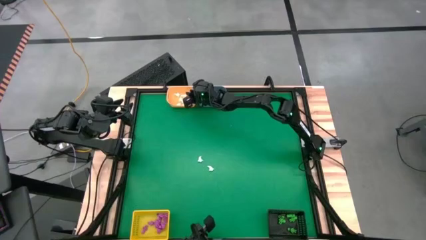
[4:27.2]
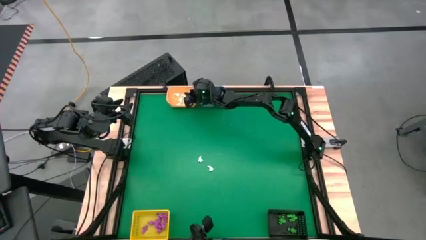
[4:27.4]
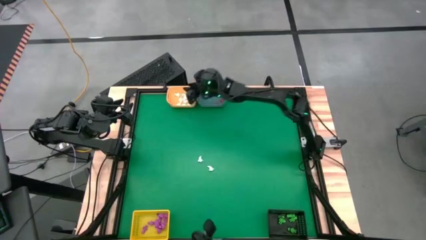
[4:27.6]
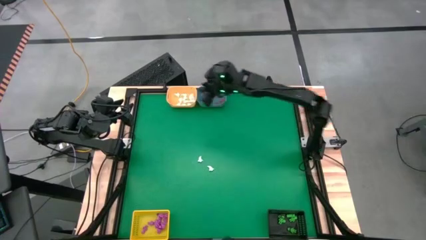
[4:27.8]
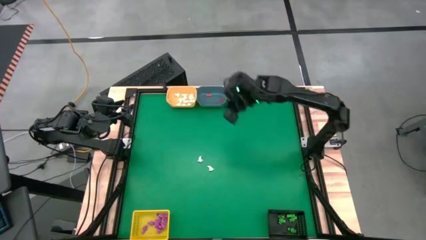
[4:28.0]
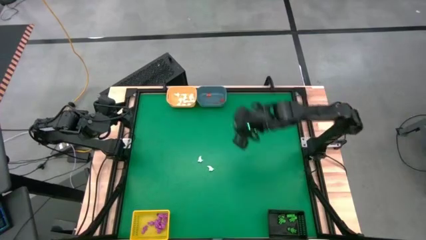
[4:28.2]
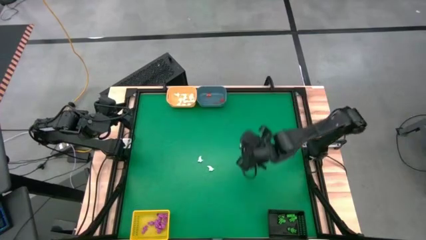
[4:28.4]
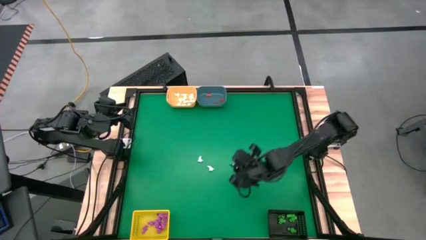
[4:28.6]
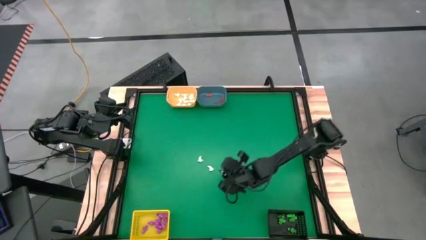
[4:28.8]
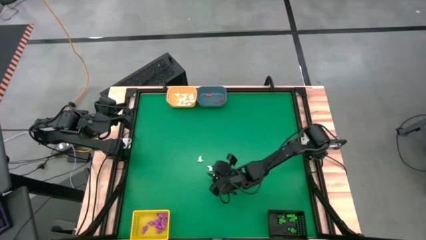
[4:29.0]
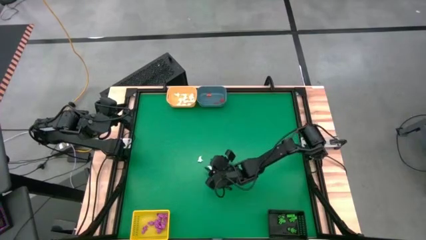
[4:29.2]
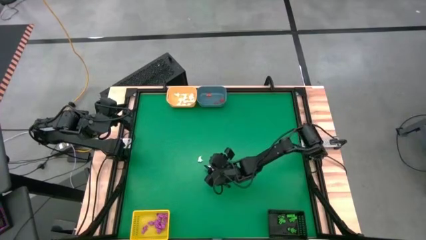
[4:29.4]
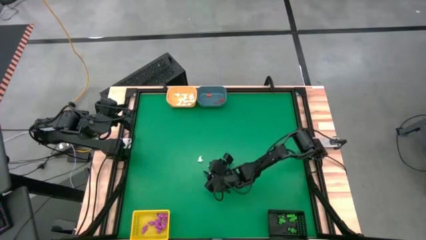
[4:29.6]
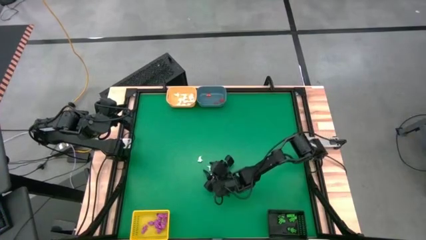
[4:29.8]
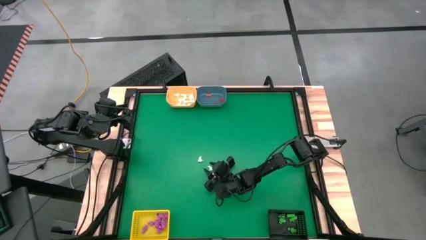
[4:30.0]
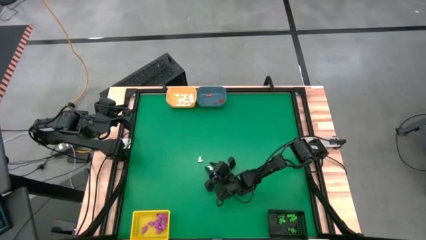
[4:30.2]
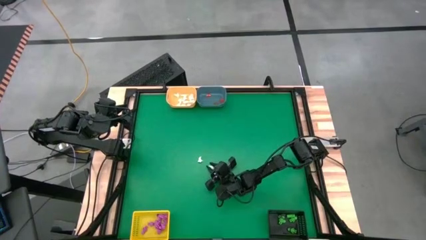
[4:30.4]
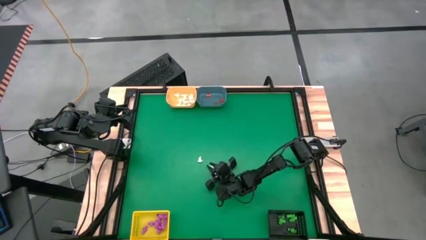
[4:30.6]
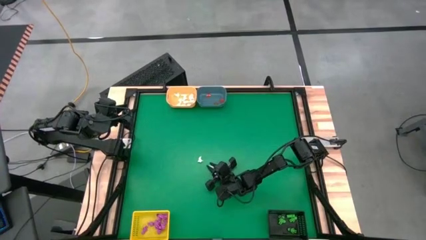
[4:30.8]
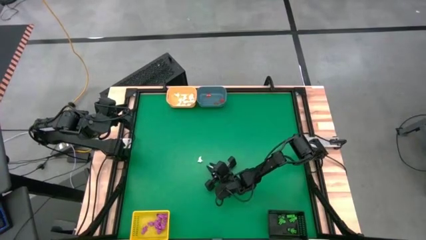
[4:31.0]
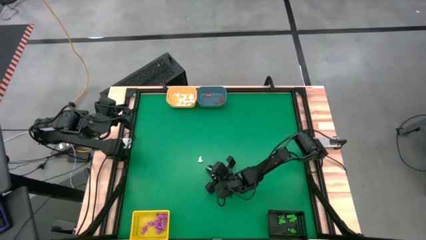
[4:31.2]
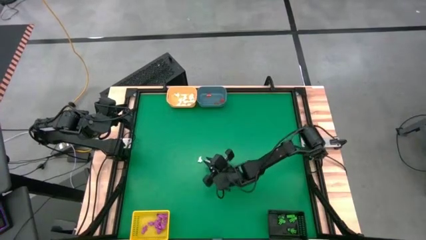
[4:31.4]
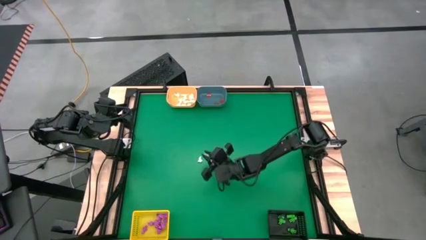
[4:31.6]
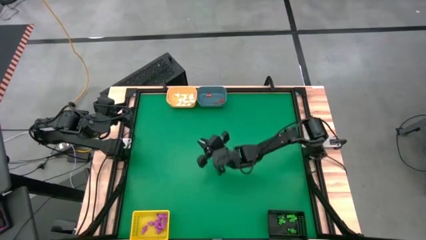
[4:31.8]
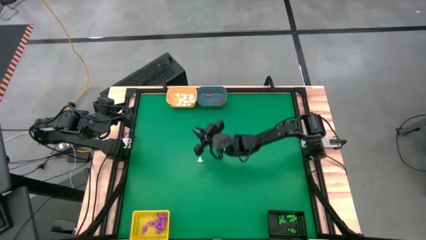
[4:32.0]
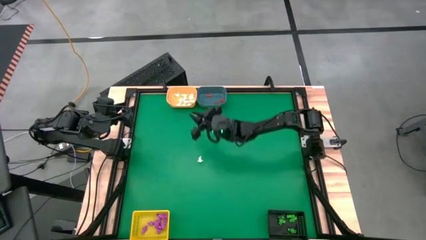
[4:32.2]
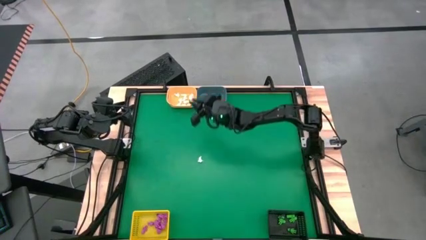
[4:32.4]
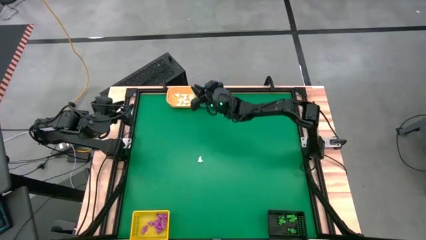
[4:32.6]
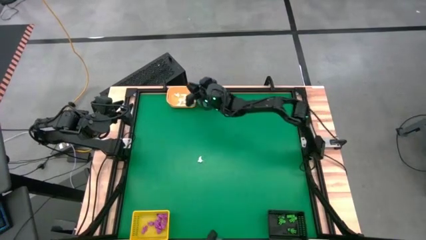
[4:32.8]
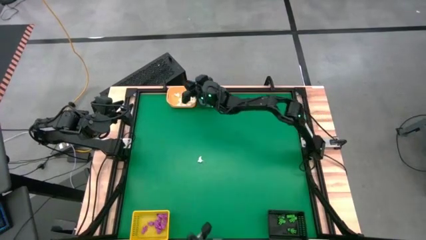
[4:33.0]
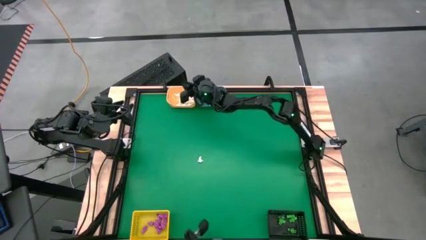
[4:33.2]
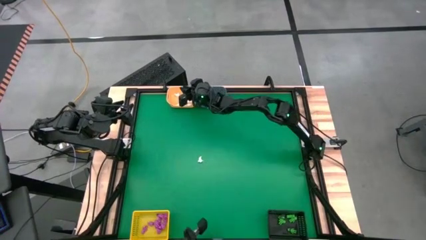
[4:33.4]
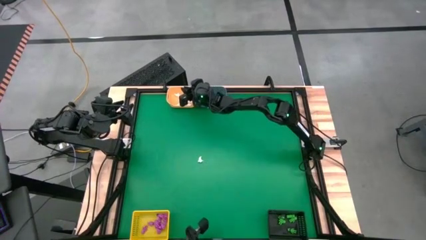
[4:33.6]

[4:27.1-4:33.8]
Task: Sort Halloween decoration
Put the white ghost into the orange bin

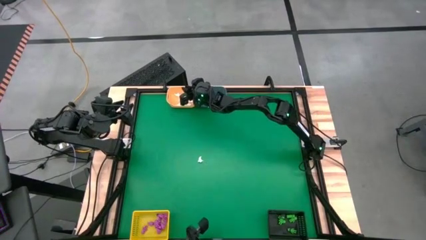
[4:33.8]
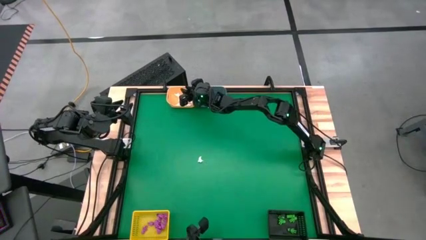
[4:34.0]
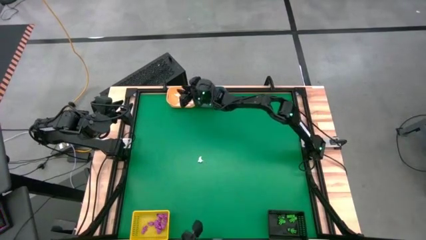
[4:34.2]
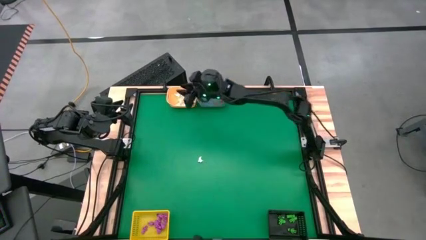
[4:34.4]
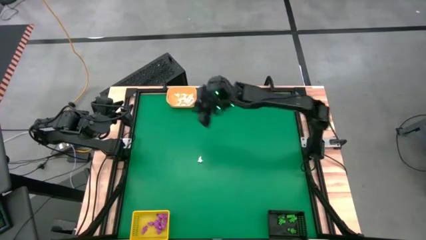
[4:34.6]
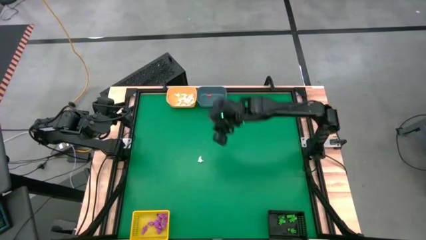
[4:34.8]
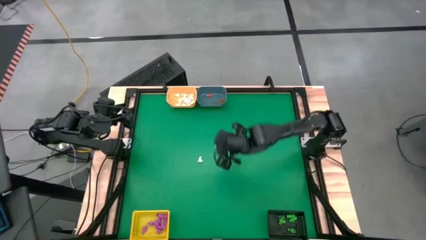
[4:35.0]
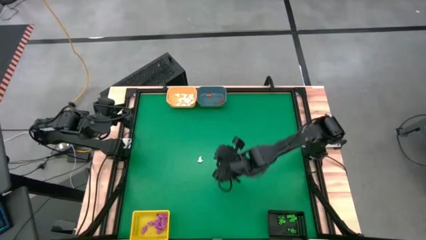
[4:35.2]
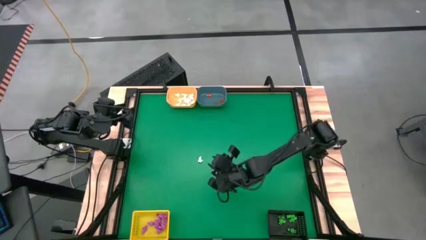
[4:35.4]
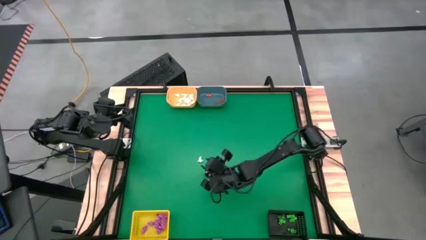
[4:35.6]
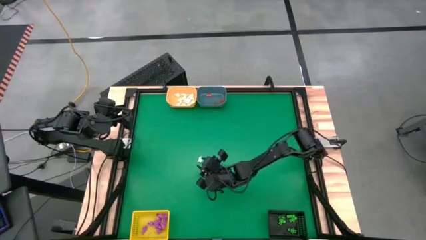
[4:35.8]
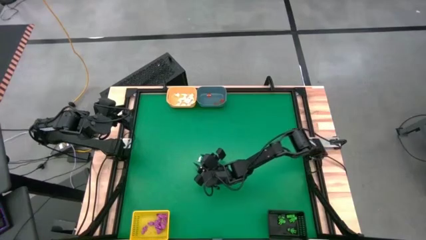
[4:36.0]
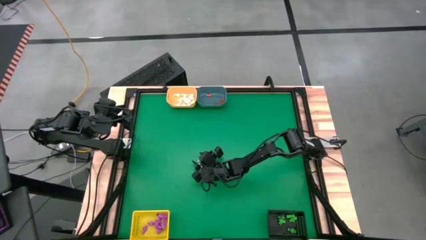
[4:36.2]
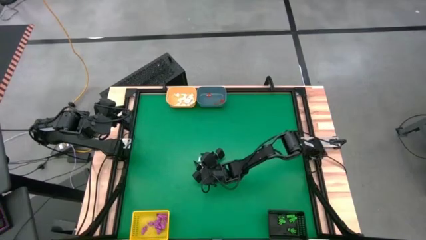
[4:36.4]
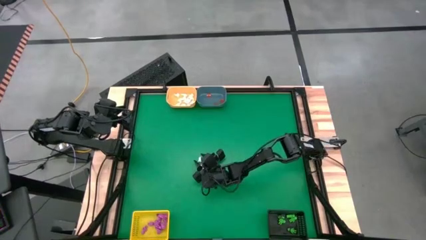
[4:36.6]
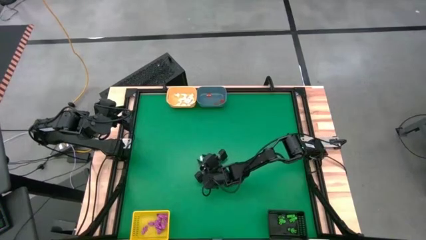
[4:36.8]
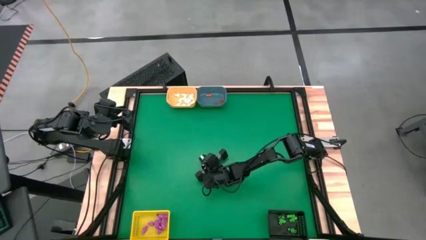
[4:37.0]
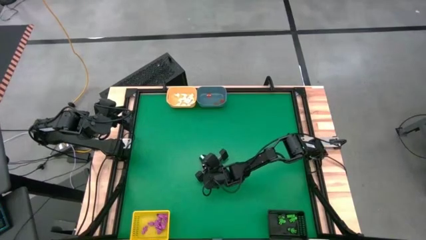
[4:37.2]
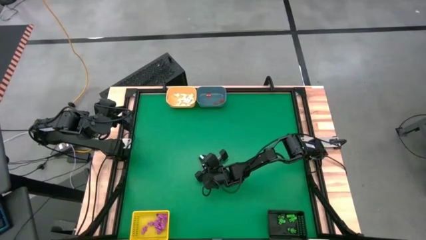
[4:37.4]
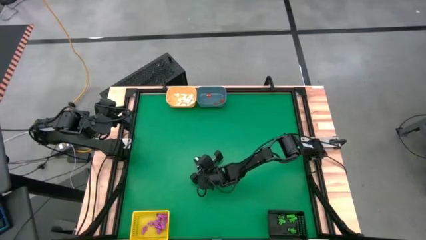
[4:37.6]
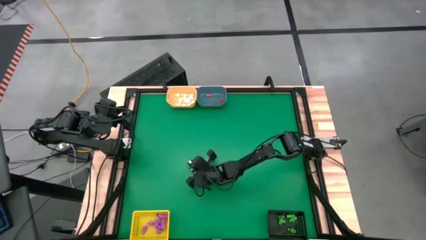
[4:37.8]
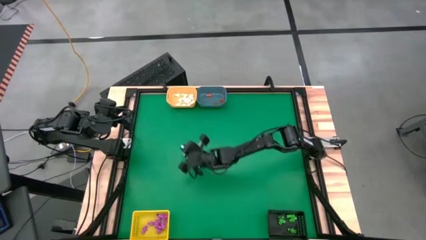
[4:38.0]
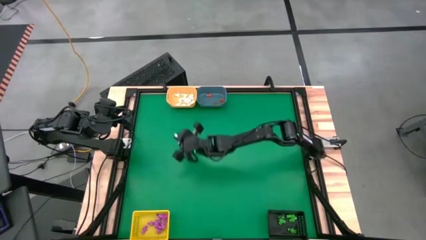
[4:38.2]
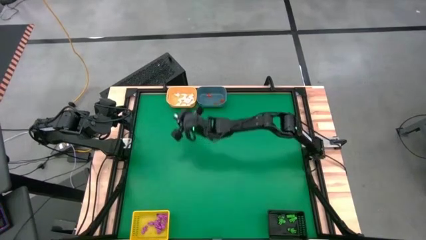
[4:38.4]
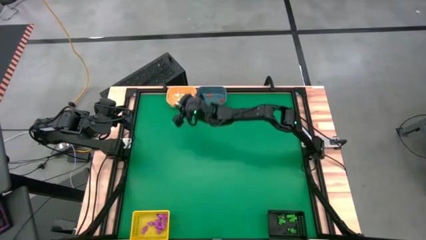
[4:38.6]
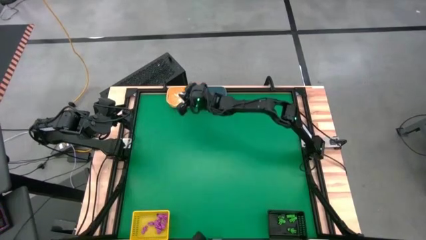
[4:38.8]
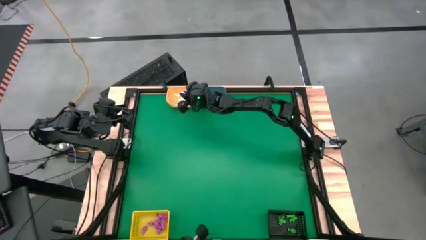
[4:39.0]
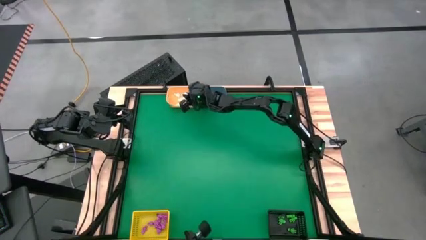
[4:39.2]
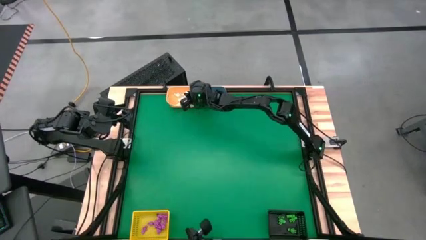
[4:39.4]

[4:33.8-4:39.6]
Put the white ghost into the orange bin
